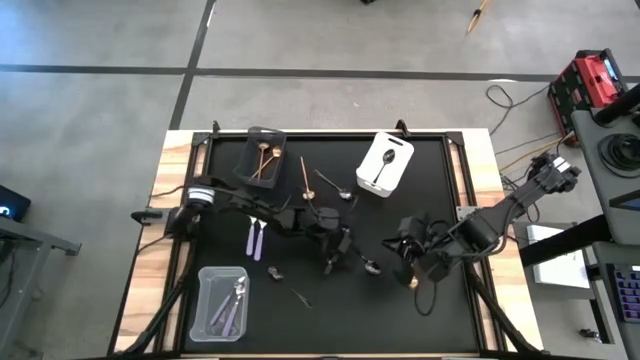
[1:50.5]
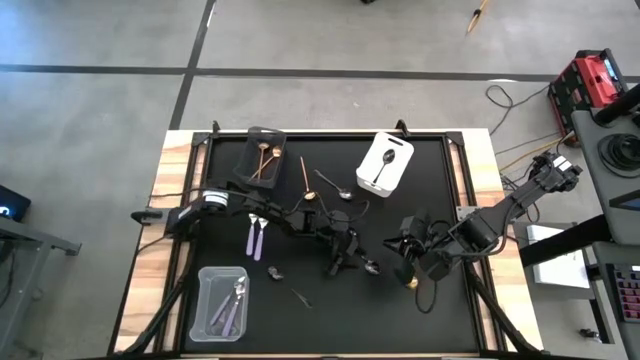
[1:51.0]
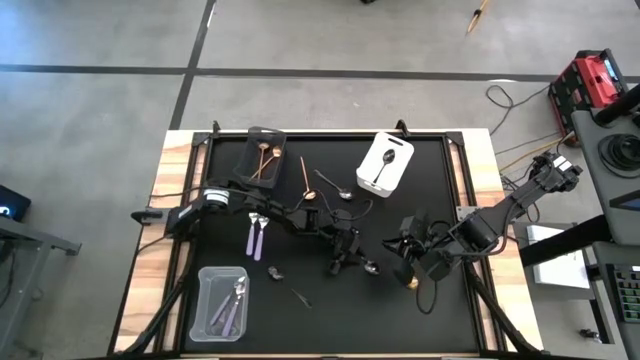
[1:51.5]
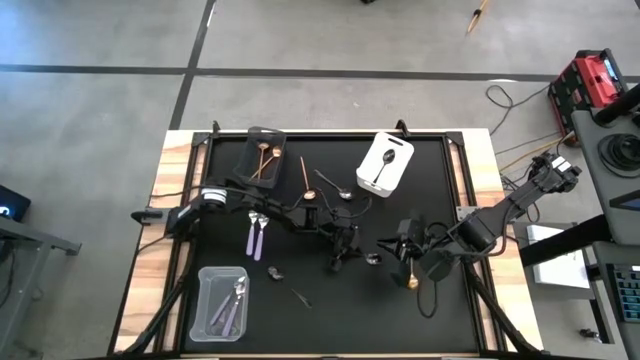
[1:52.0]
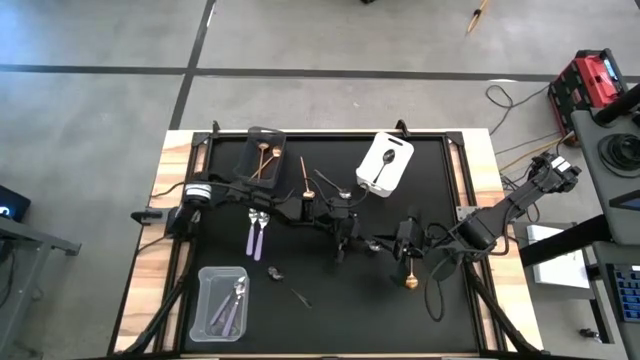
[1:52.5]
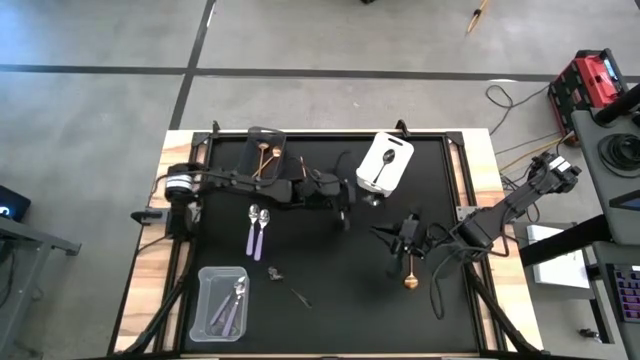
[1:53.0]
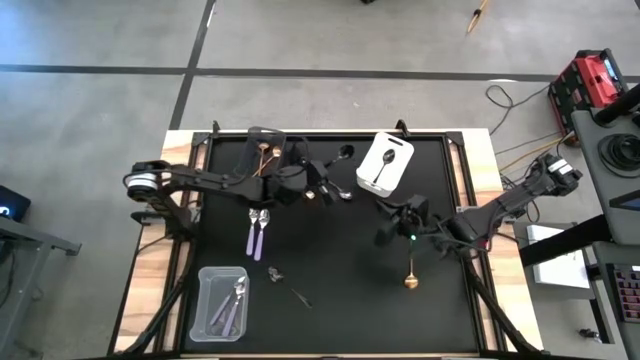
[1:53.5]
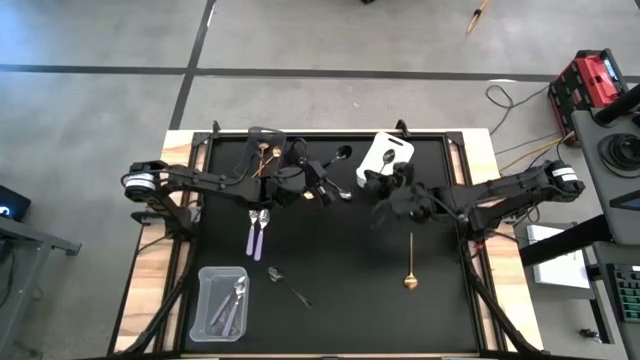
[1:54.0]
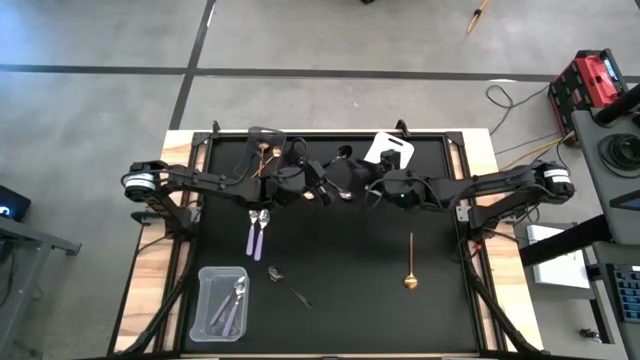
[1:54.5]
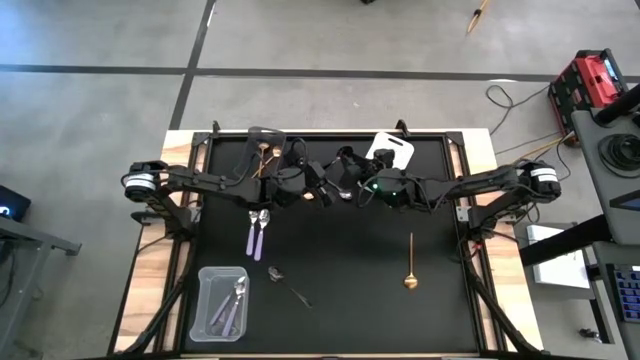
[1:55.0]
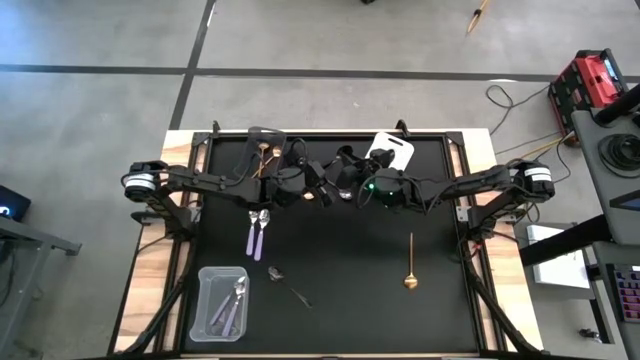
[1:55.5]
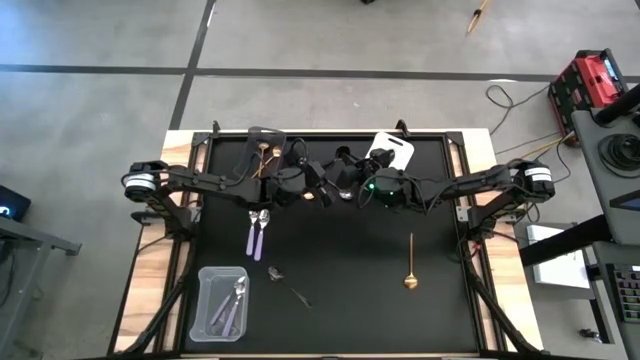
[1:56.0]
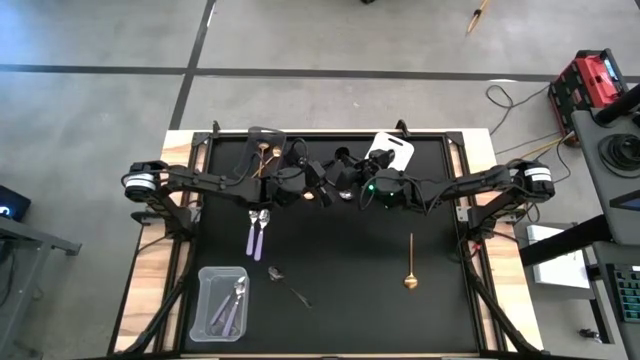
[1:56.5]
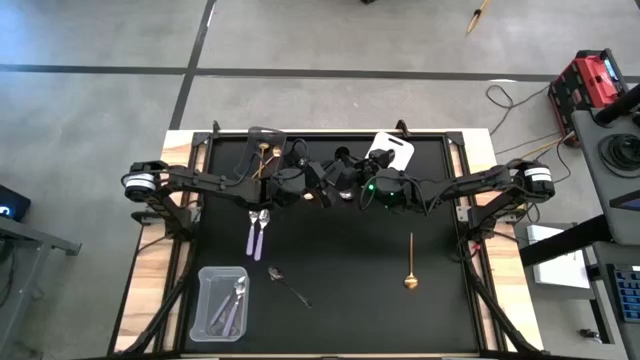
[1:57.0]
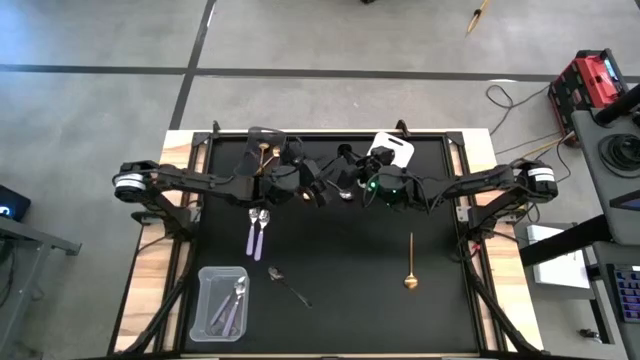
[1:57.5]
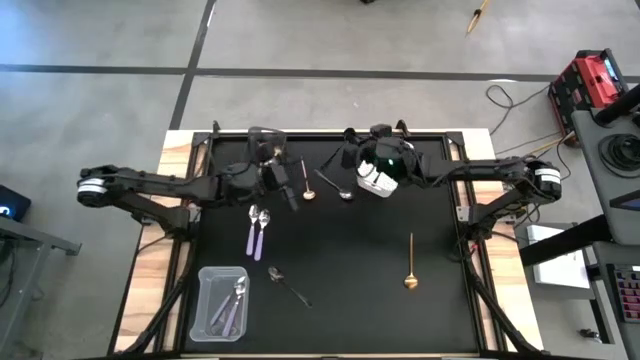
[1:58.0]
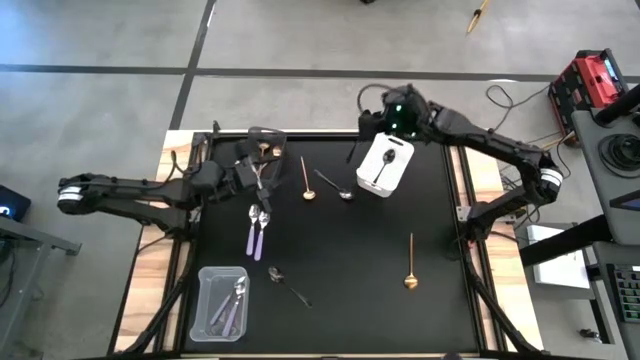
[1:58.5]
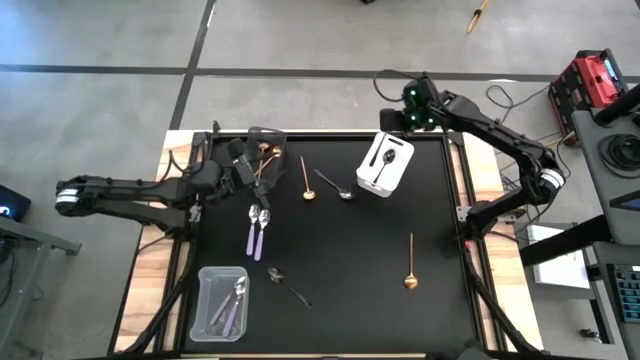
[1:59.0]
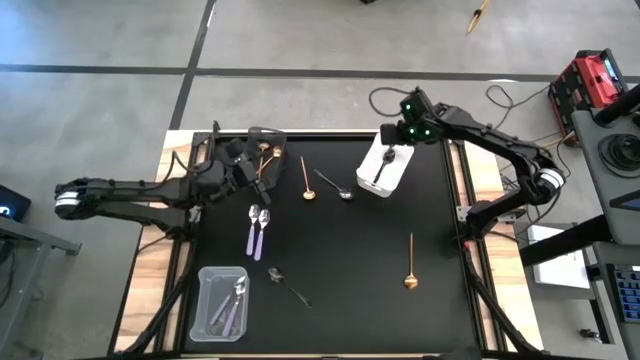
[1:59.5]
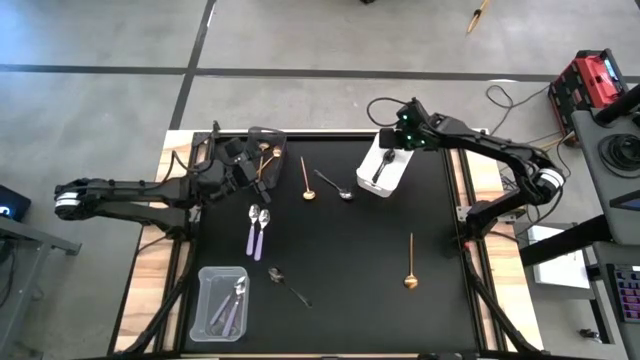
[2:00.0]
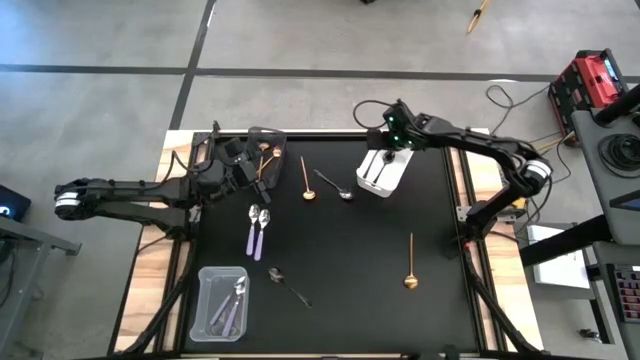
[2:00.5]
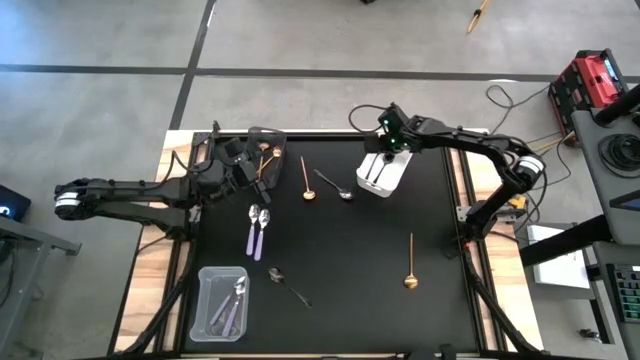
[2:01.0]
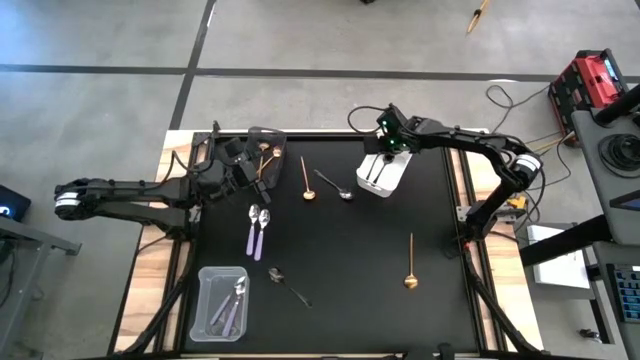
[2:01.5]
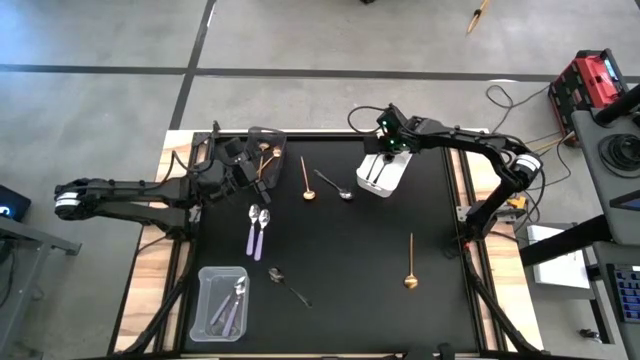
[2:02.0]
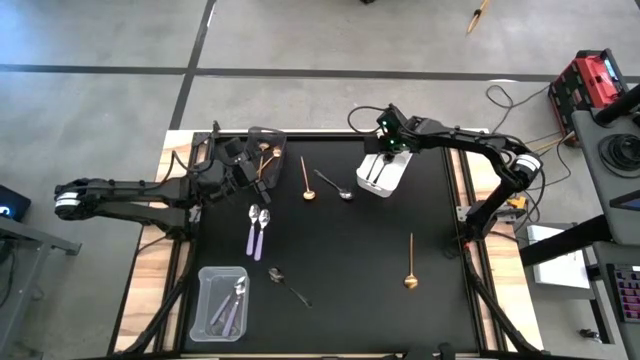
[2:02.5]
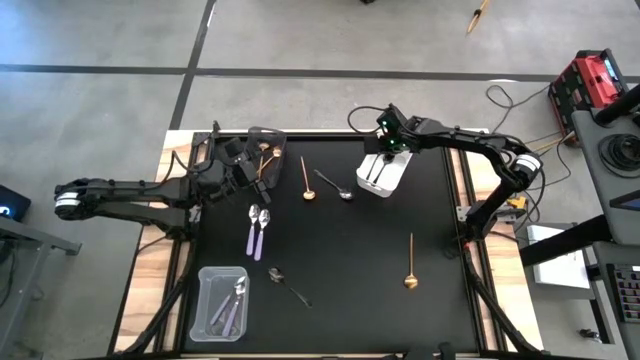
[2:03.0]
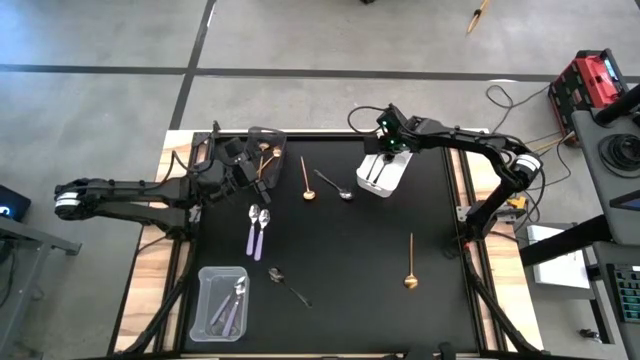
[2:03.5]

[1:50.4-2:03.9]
Task: Sort silverware by color (type)
Put the black spoon into the white bin

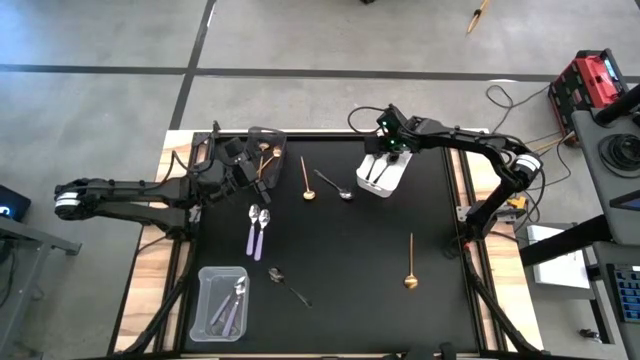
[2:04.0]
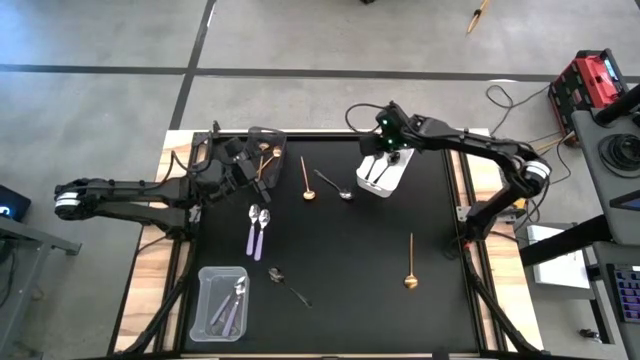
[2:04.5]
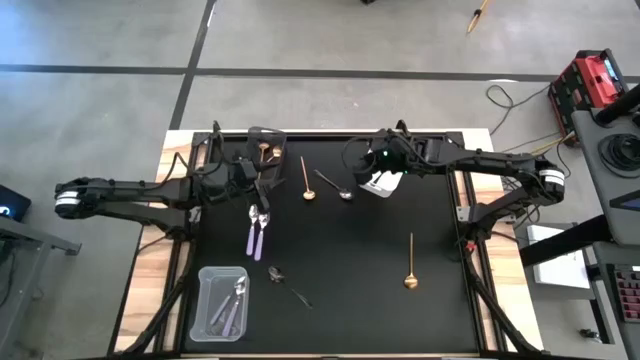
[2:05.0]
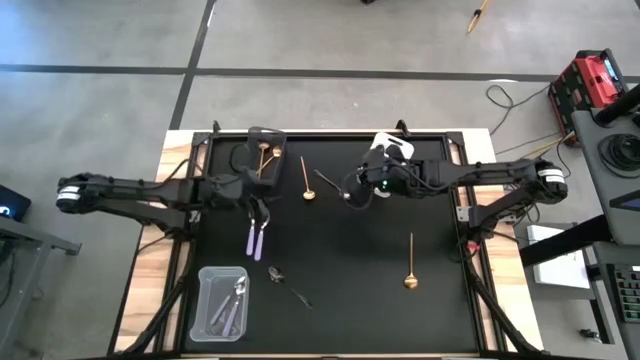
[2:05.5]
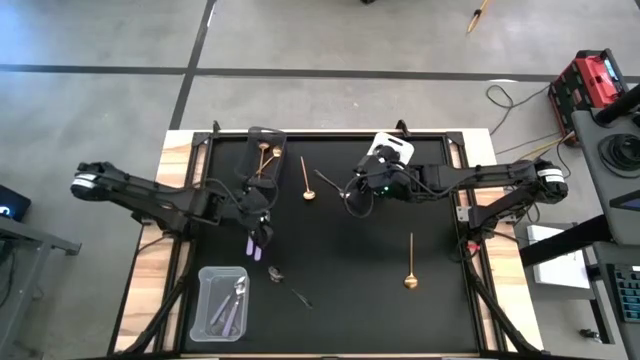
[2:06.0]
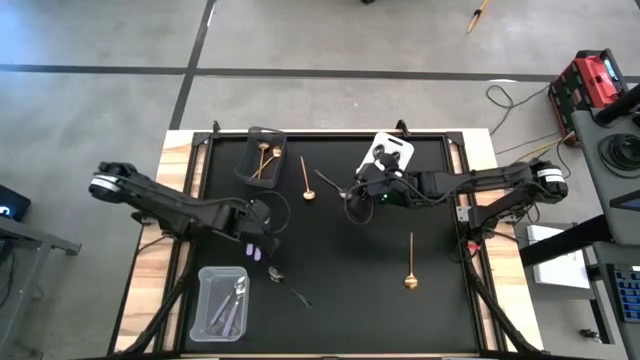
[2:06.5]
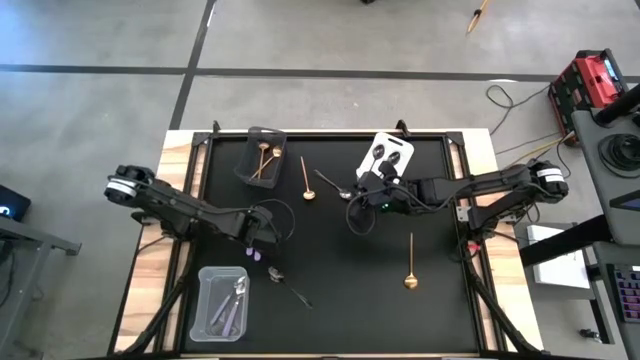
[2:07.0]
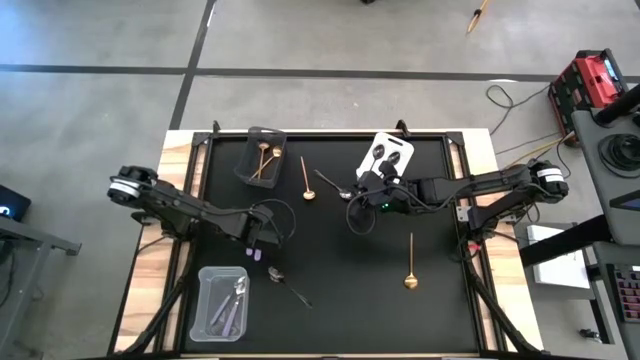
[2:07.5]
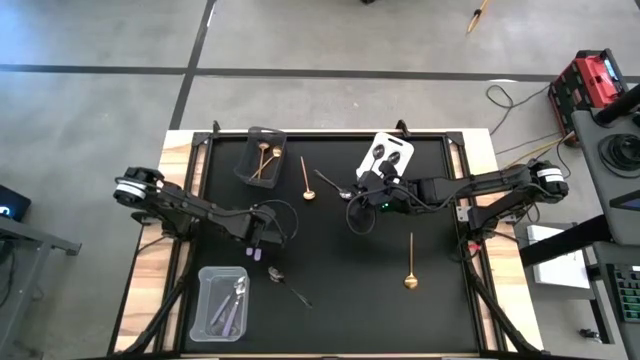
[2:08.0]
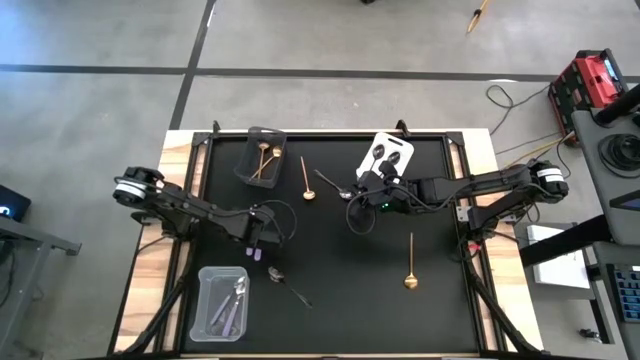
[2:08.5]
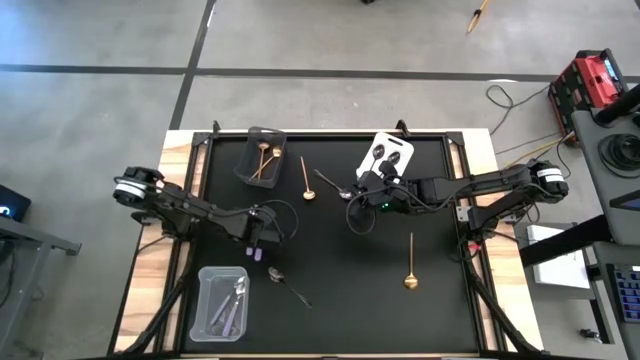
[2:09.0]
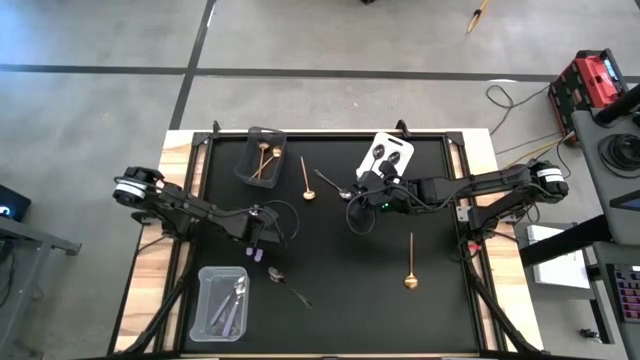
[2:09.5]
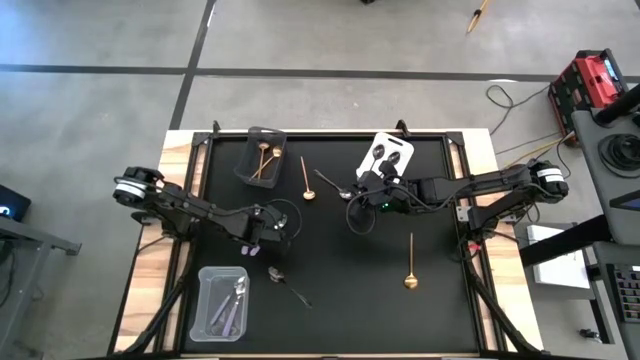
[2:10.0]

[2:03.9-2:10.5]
Put the purple spoon into the transparent bin

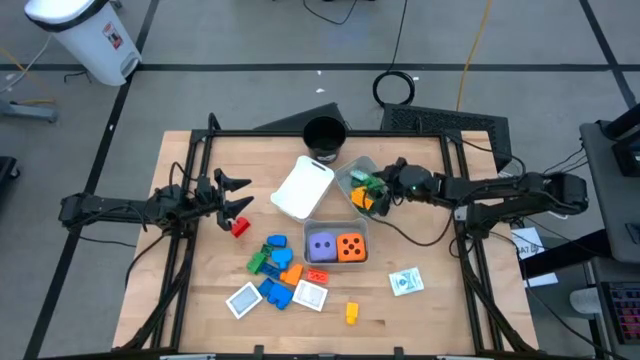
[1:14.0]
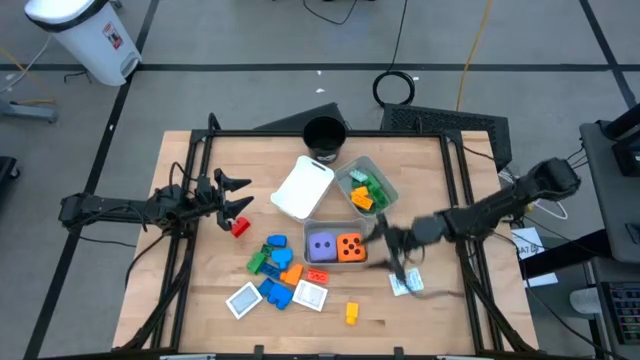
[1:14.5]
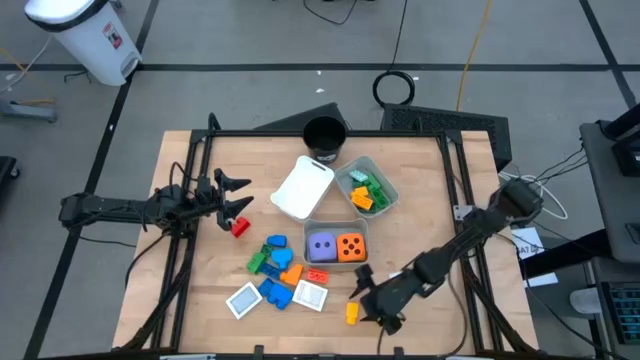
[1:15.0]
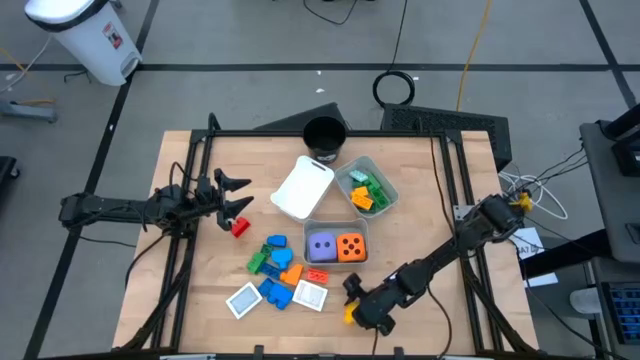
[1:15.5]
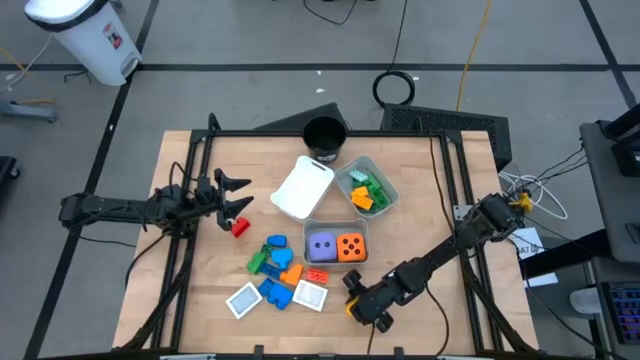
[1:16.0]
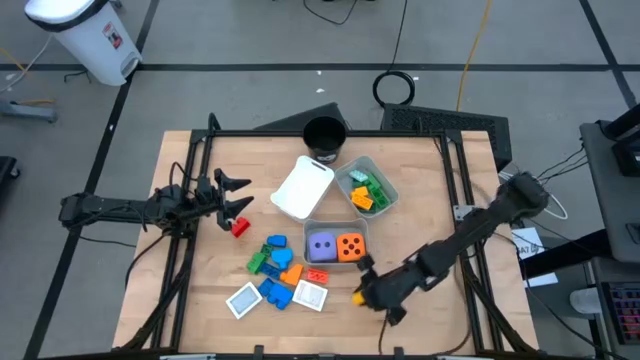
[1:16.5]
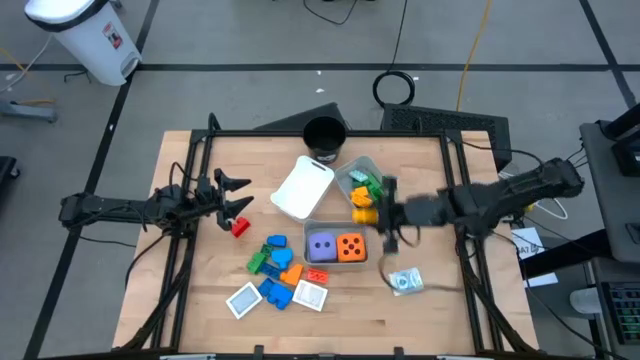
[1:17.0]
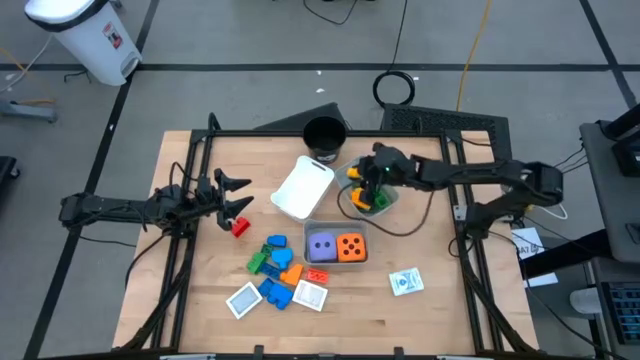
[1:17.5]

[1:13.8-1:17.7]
Task: Pick & Place Toys
Put the yellow game piece into the top gray bin
